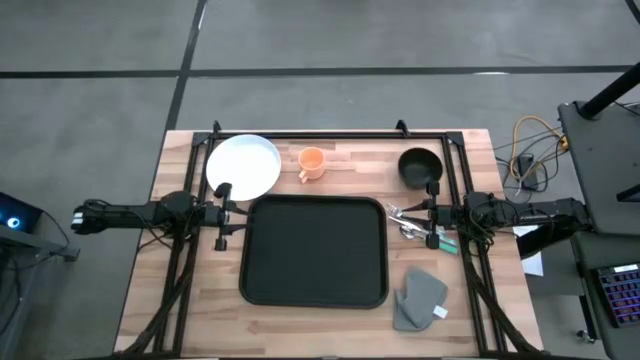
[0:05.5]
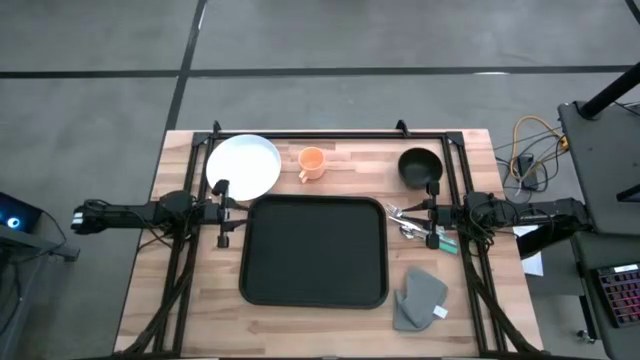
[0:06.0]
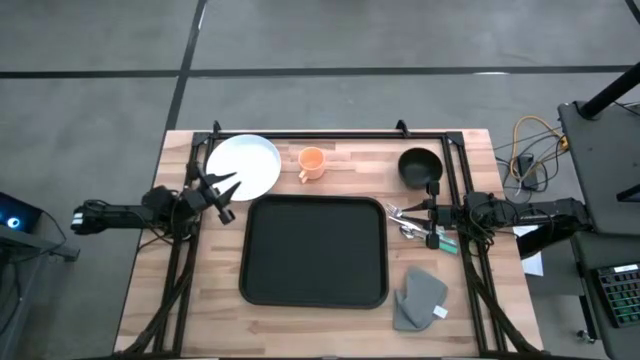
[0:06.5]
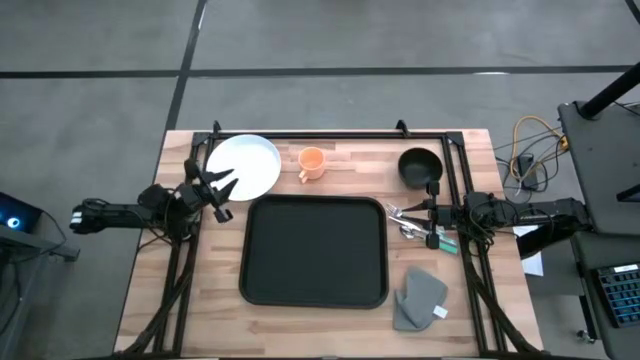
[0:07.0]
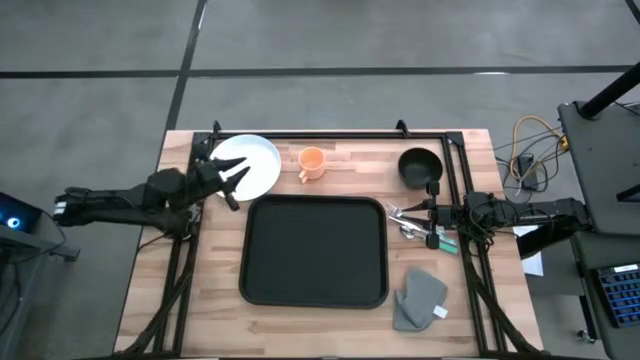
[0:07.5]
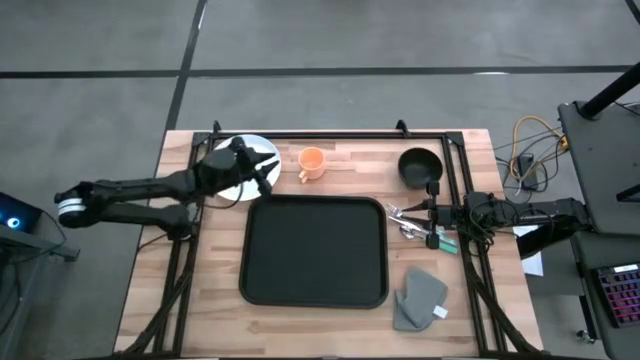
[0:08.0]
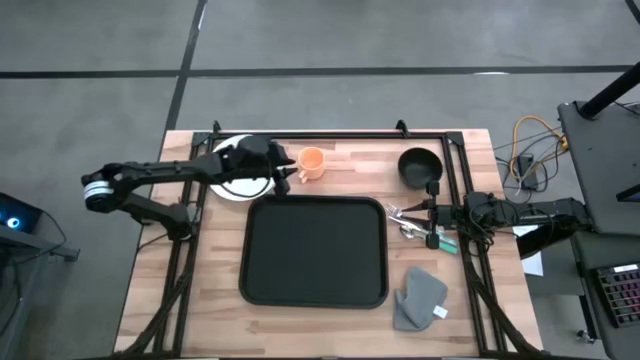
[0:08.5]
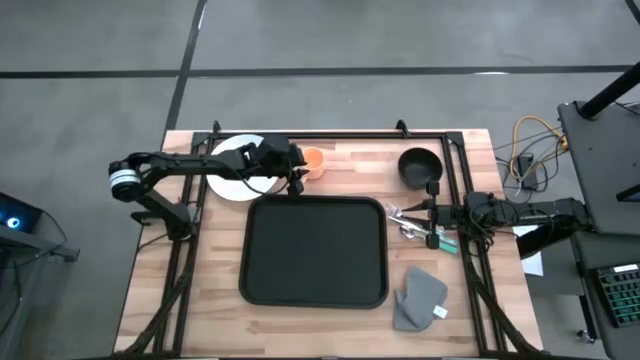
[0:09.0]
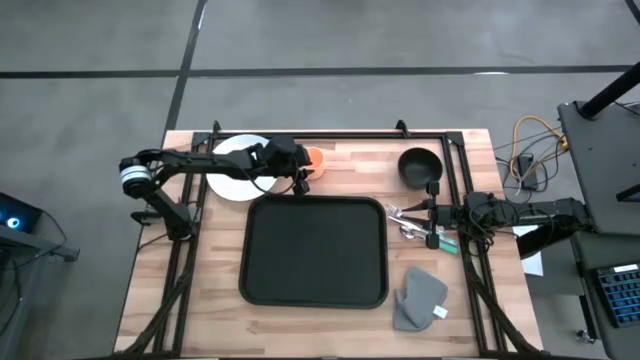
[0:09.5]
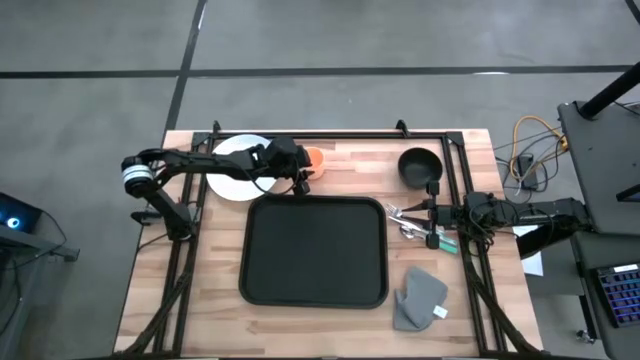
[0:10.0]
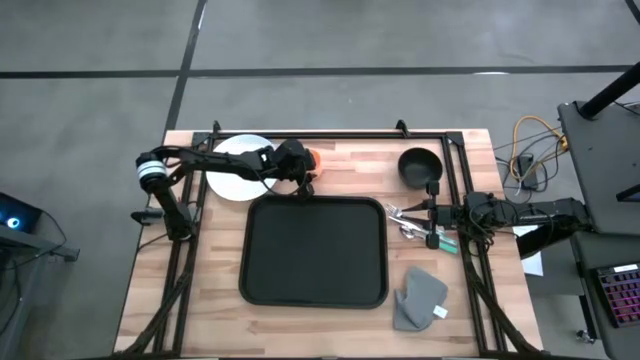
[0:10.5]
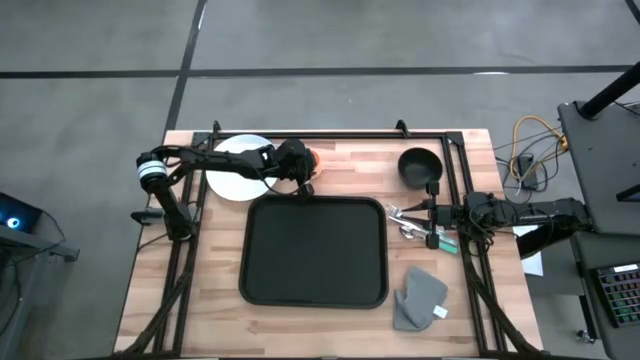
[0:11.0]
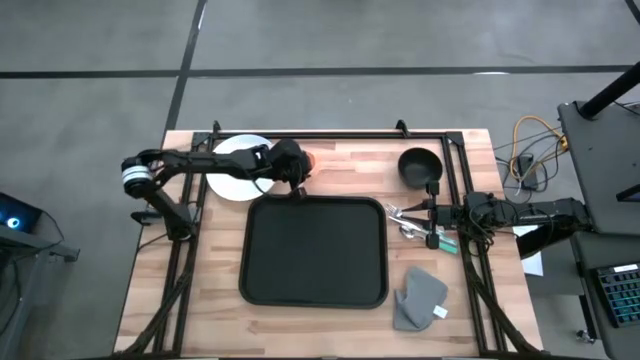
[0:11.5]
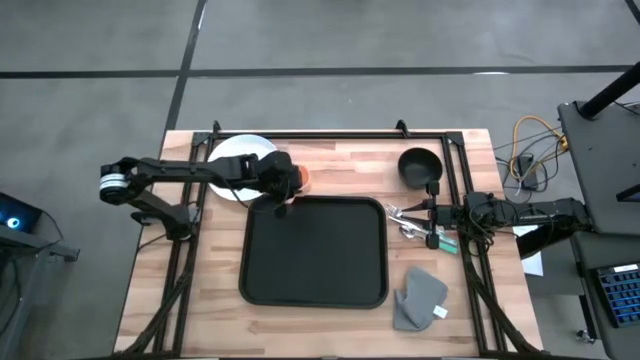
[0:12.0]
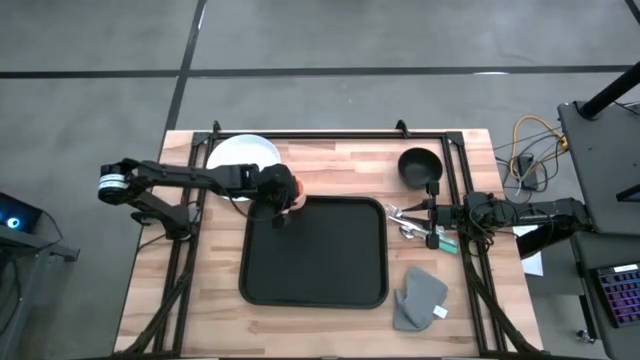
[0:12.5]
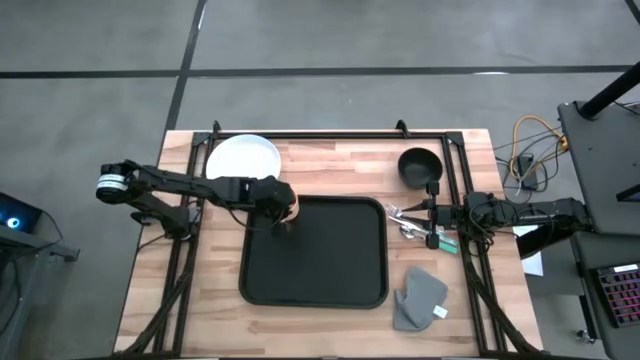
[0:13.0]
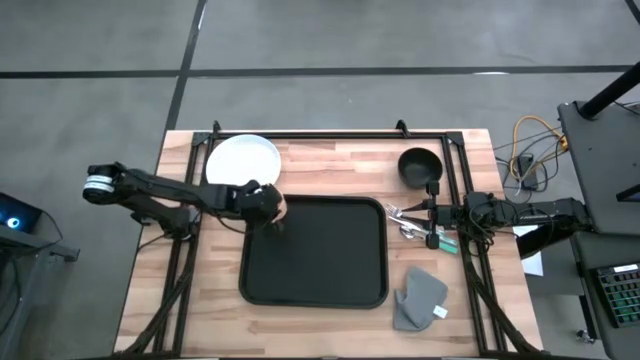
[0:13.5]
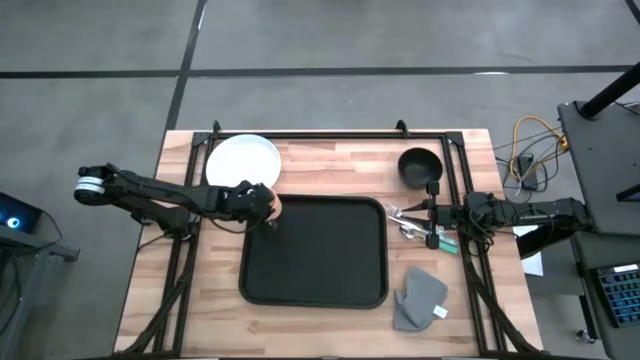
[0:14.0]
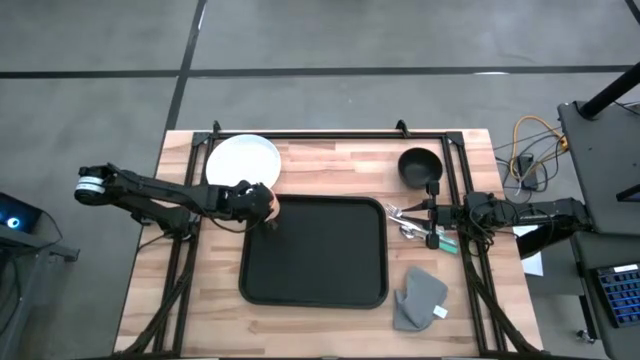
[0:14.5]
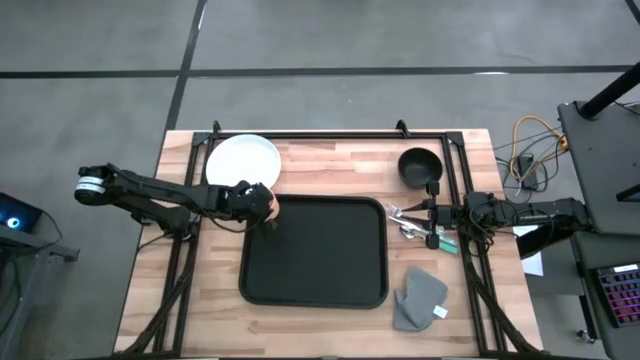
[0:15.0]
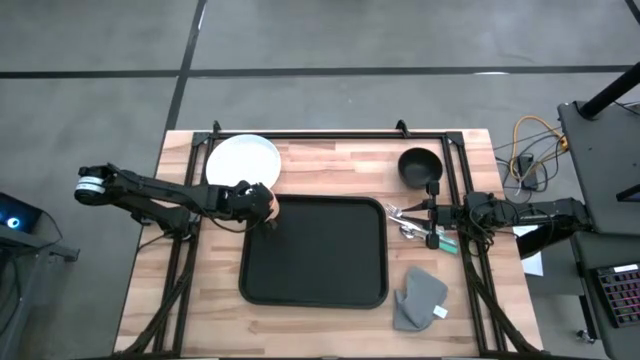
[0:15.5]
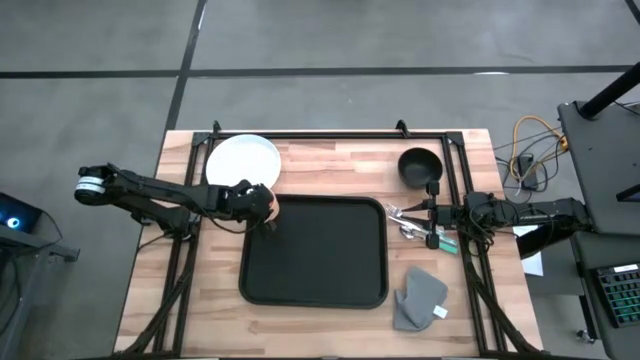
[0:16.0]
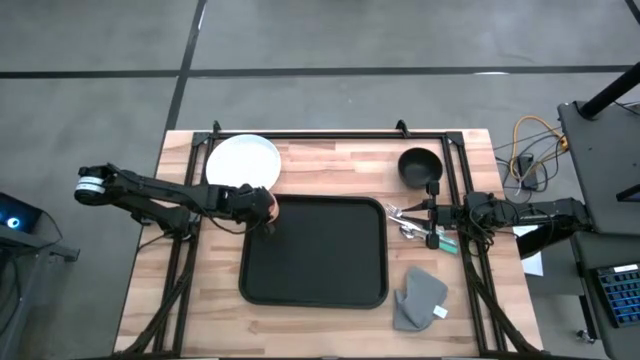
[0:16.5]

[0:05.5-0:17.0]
Task: Set up tray
Put the orange mug on the black serving tray

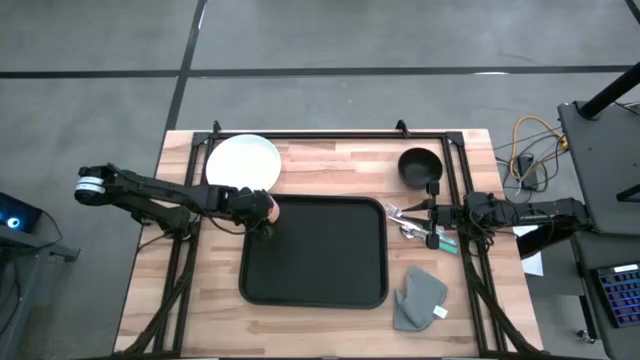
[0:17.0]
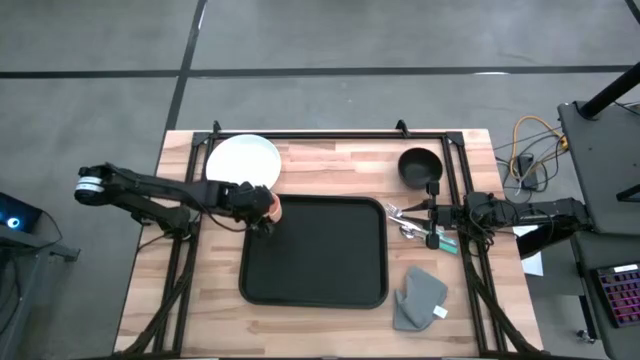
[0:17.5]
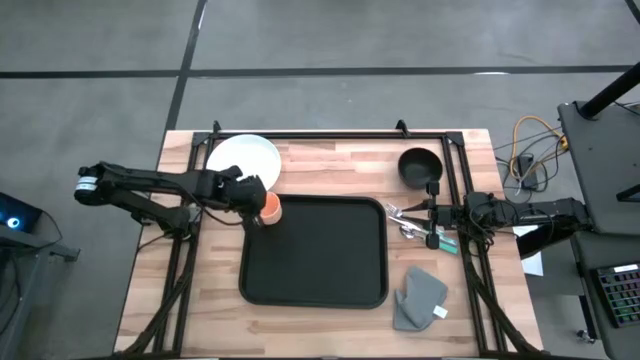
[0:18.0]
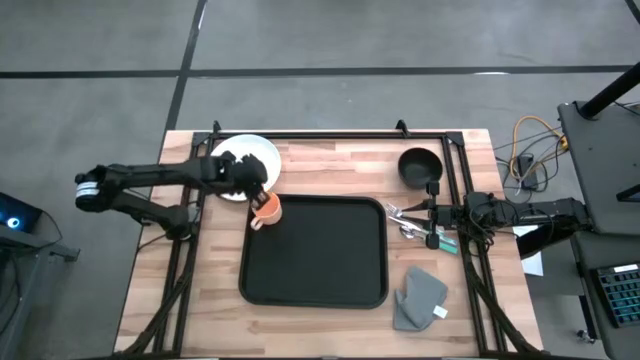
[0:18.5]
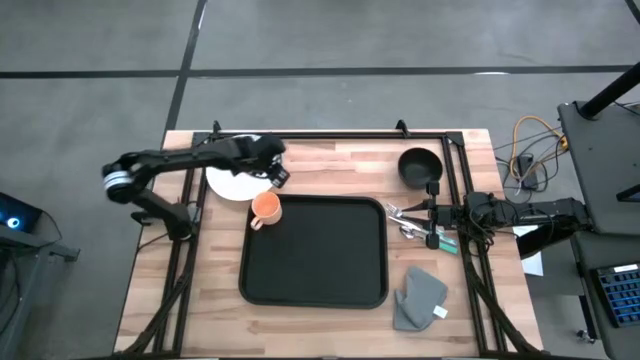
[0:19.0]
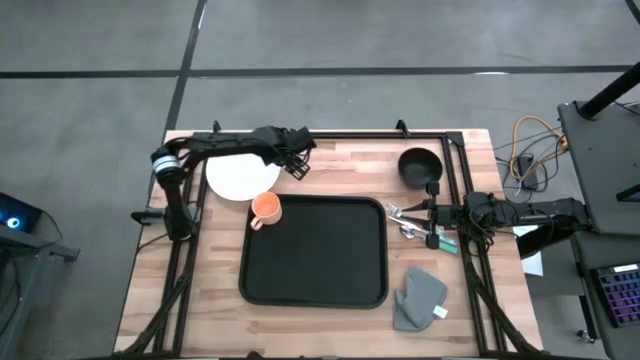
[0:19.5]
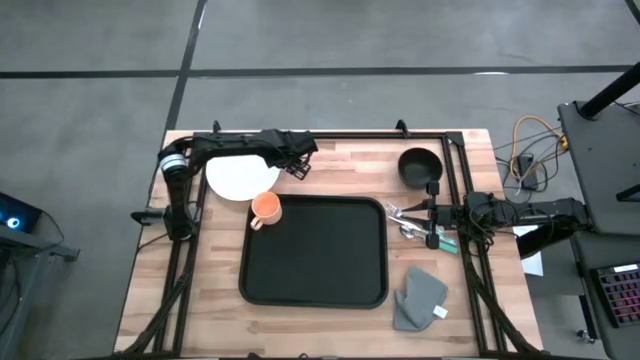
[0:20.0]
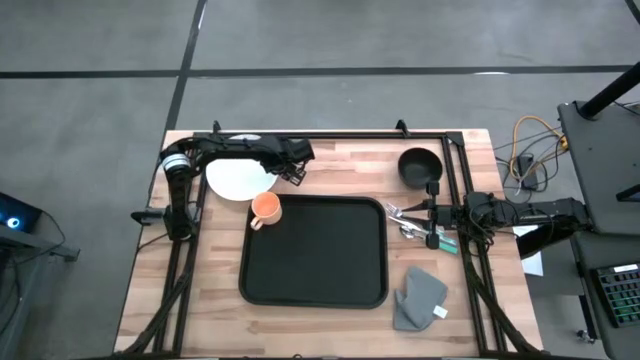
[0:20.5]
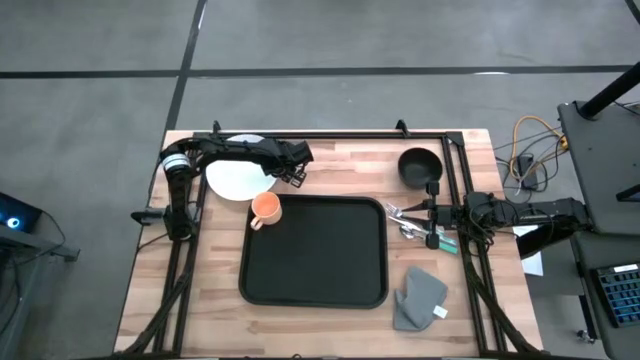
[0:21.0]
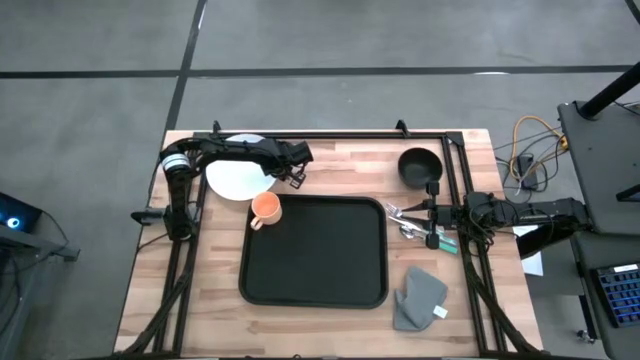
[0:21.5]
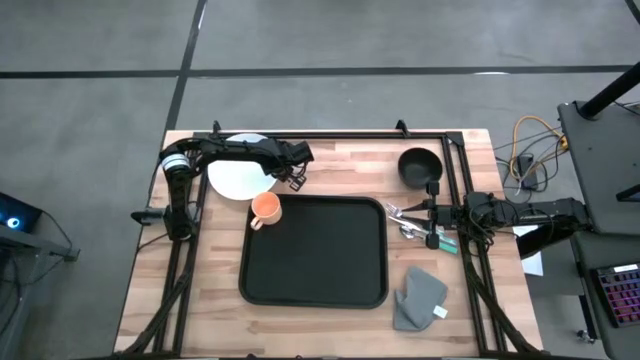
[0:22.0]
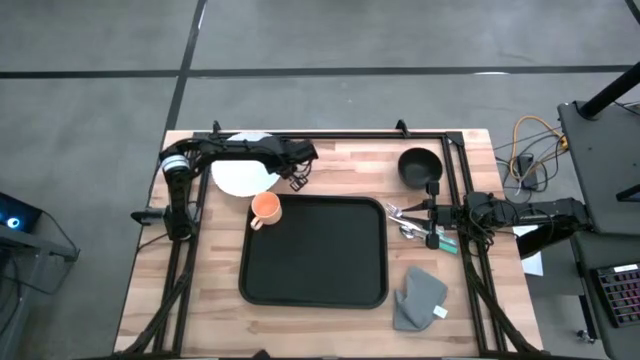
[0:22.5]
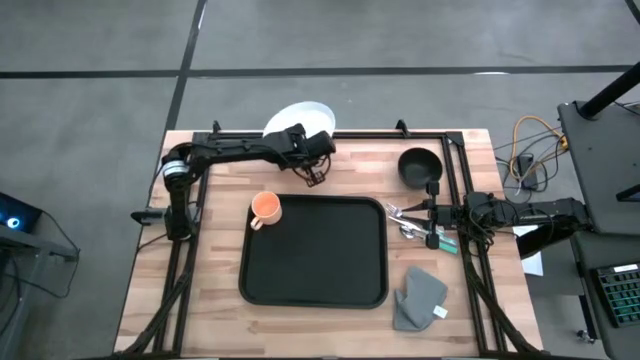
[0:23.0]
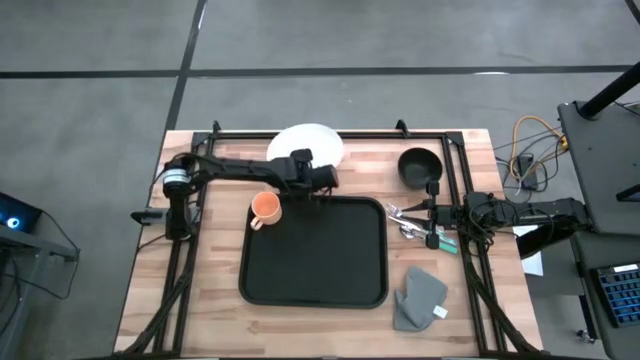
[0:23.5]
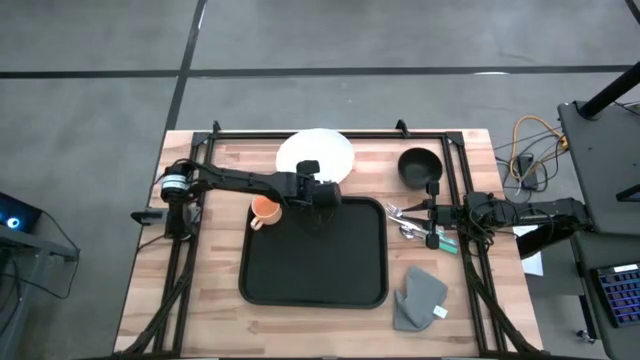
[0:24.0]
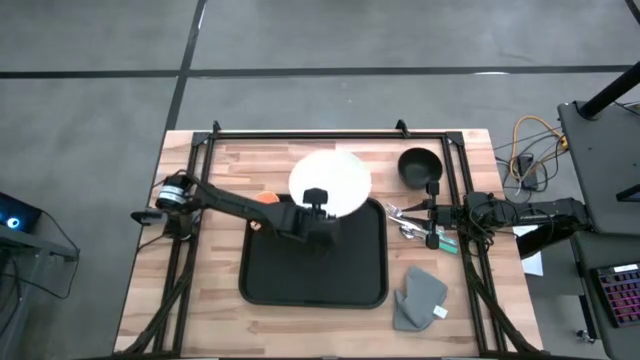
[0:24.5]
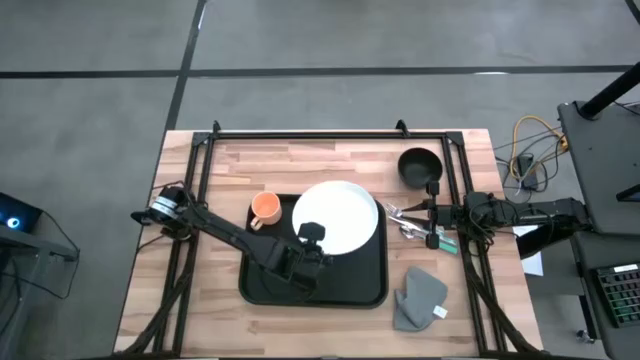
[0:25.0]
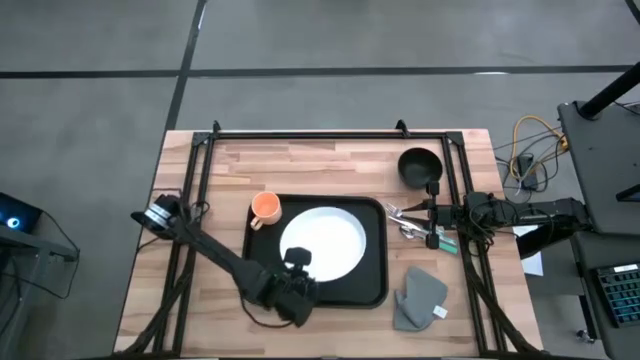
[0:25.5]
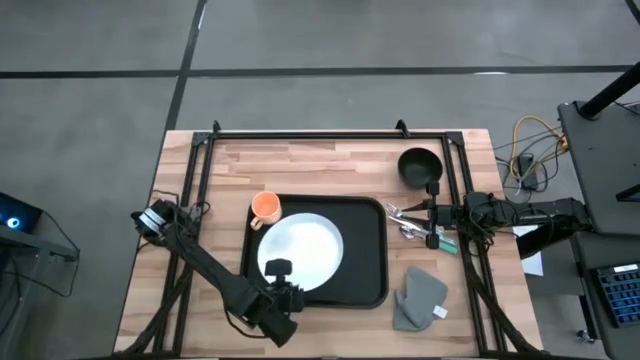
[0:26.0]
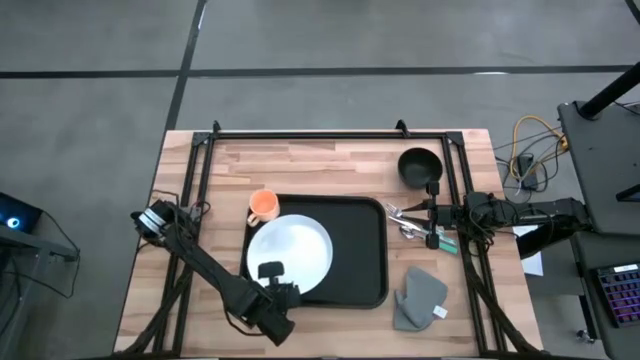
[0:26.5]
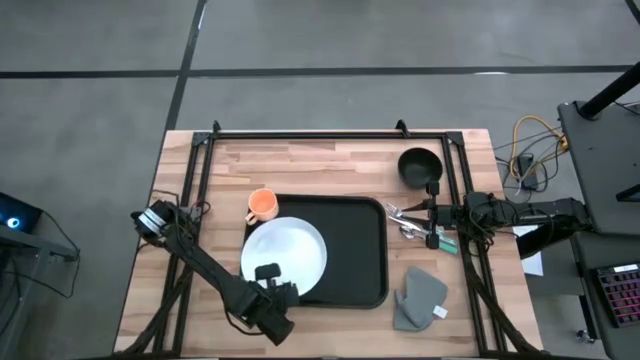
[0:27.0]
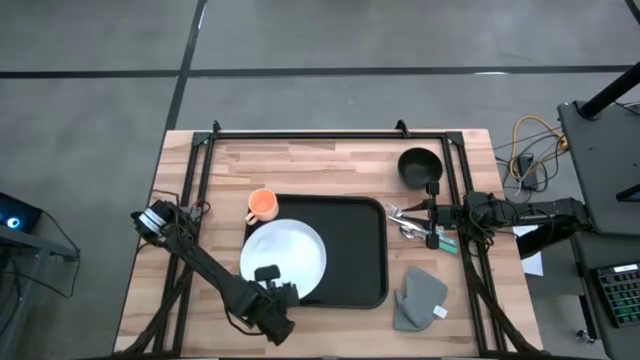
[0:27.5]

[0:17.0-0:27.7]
Put the white plate on the black serving tray to the bottom left of the orange mug
